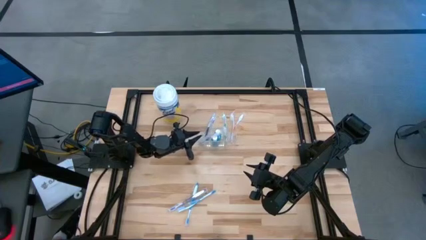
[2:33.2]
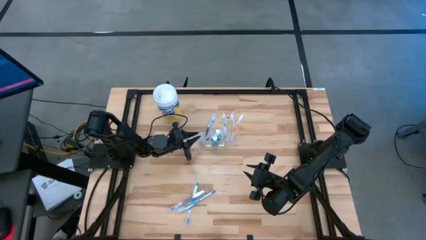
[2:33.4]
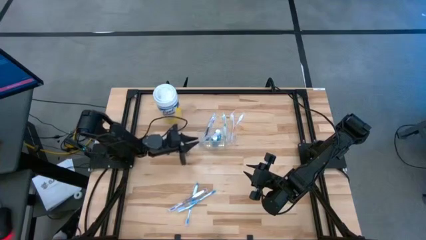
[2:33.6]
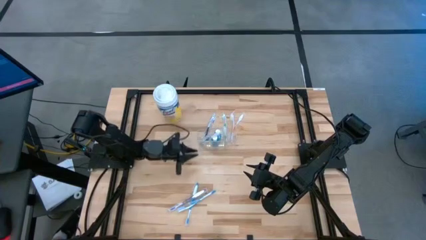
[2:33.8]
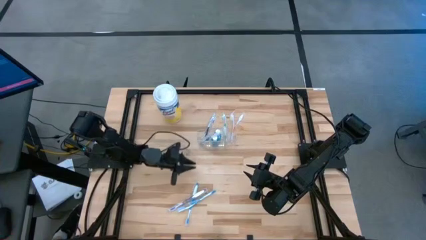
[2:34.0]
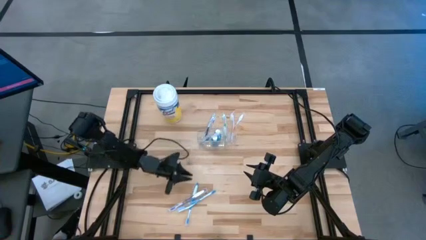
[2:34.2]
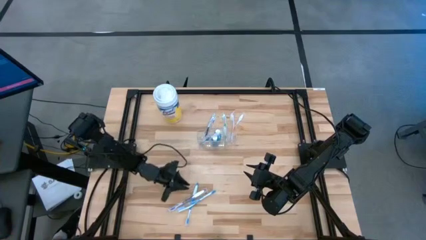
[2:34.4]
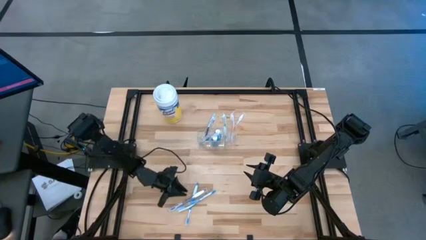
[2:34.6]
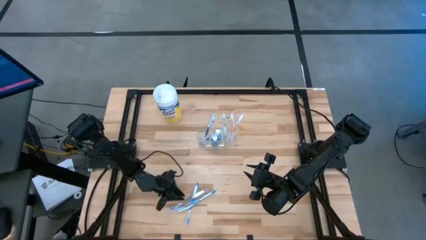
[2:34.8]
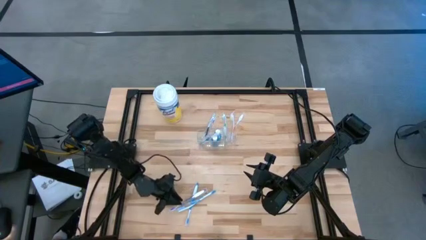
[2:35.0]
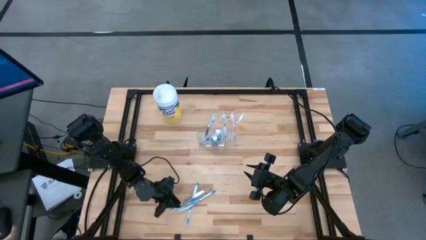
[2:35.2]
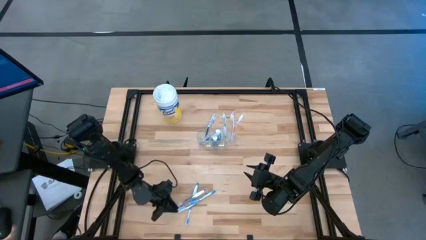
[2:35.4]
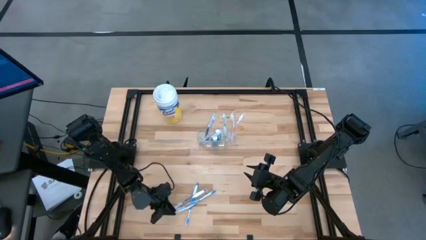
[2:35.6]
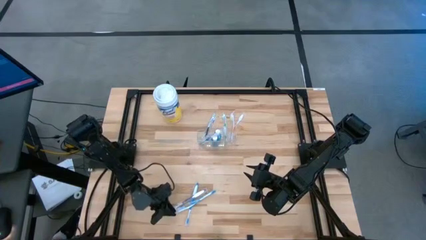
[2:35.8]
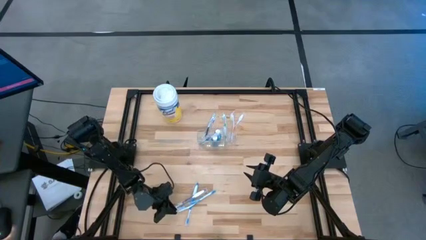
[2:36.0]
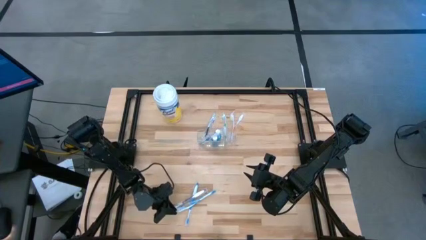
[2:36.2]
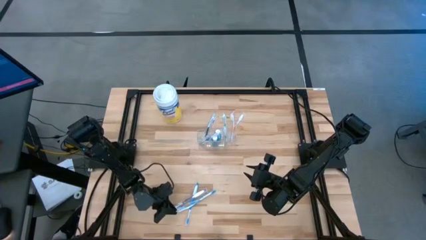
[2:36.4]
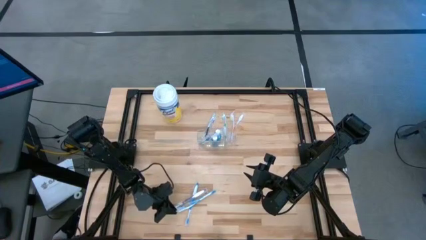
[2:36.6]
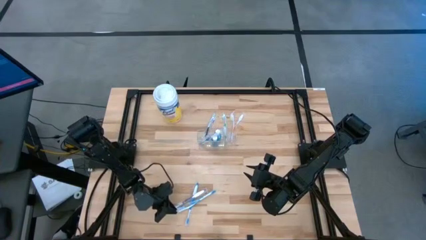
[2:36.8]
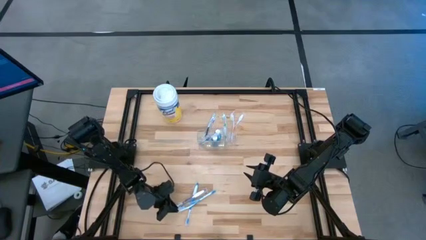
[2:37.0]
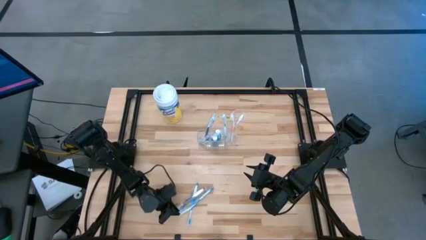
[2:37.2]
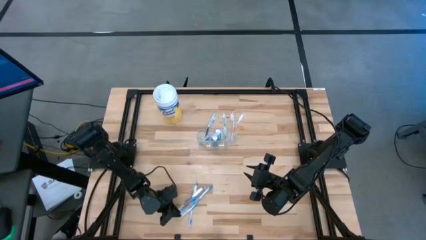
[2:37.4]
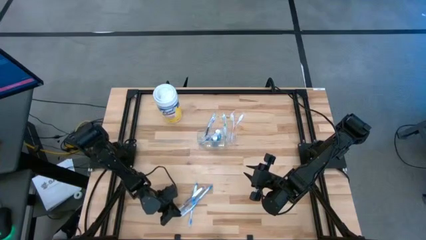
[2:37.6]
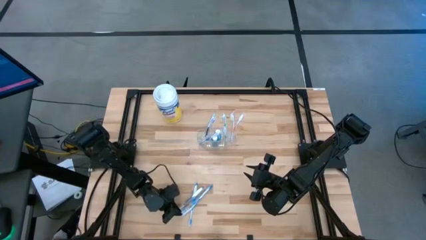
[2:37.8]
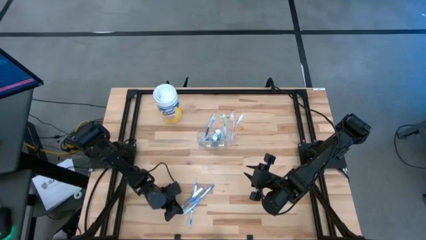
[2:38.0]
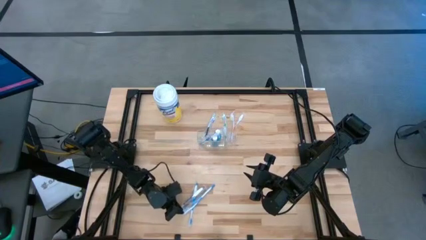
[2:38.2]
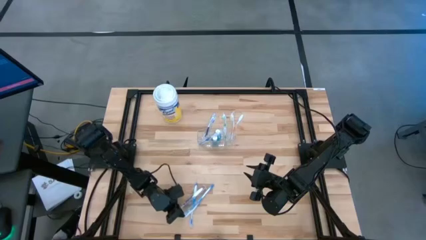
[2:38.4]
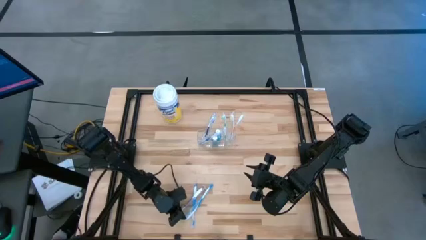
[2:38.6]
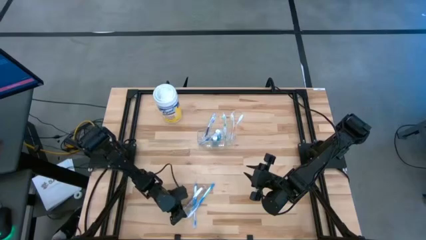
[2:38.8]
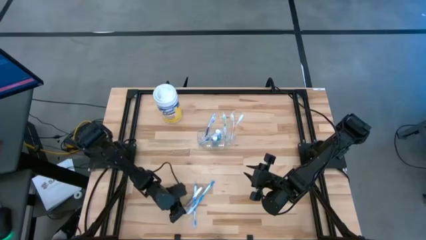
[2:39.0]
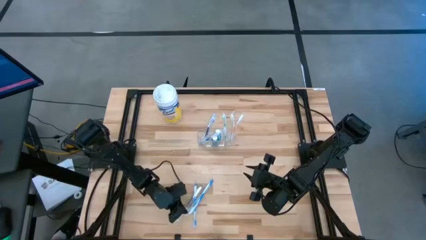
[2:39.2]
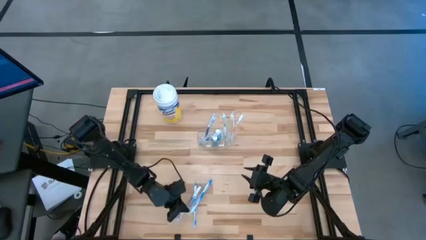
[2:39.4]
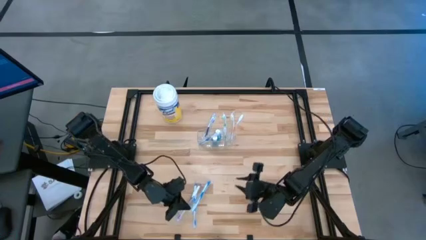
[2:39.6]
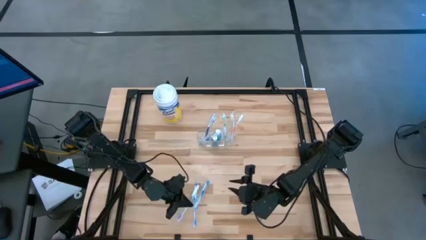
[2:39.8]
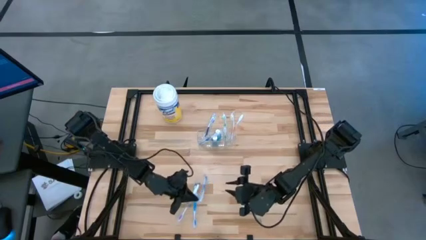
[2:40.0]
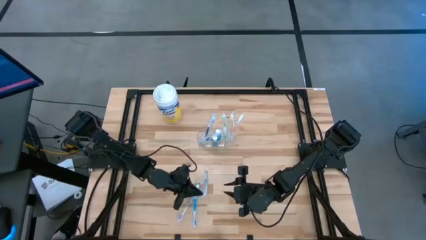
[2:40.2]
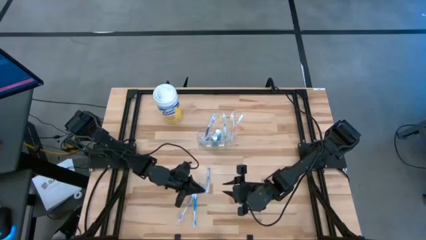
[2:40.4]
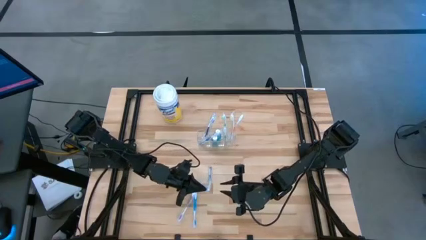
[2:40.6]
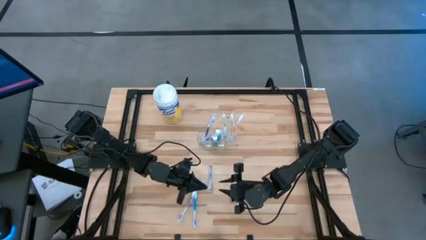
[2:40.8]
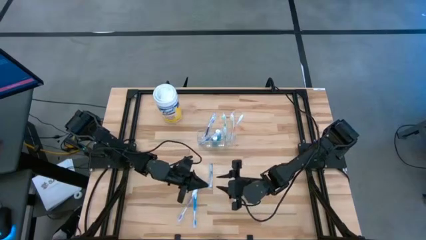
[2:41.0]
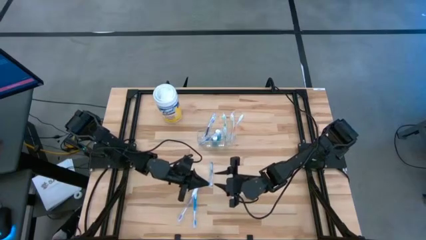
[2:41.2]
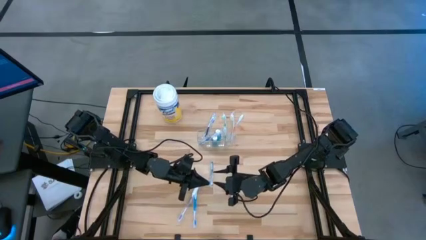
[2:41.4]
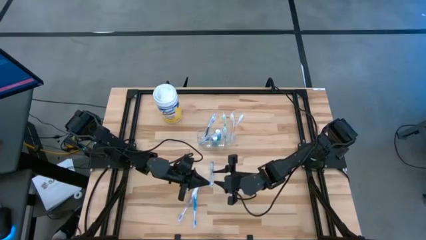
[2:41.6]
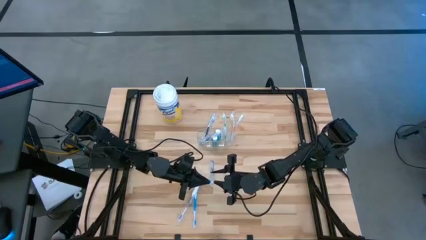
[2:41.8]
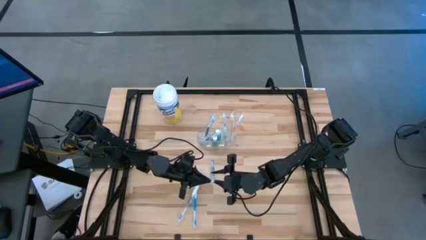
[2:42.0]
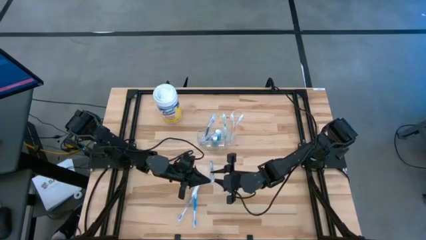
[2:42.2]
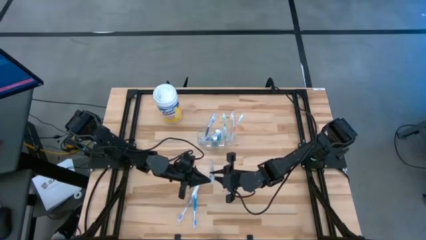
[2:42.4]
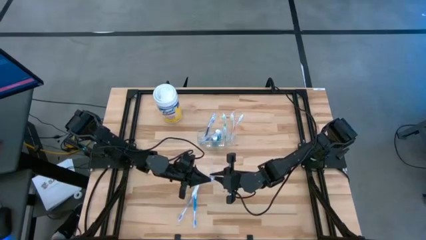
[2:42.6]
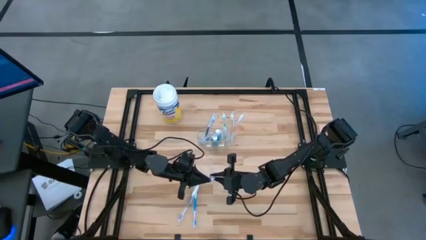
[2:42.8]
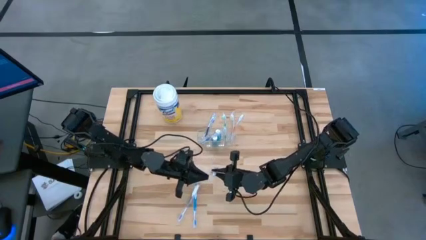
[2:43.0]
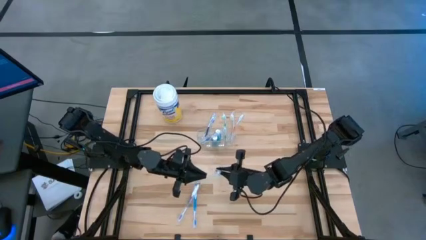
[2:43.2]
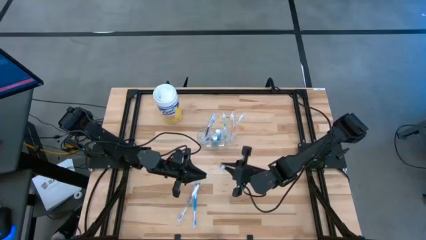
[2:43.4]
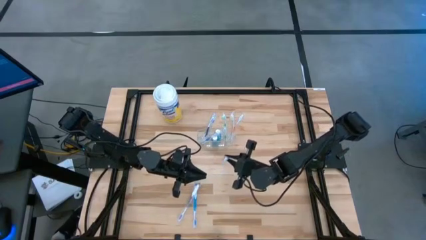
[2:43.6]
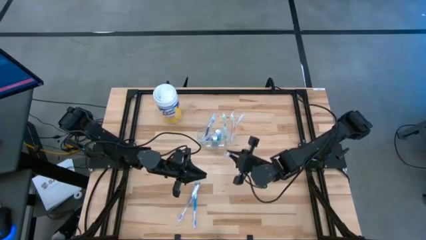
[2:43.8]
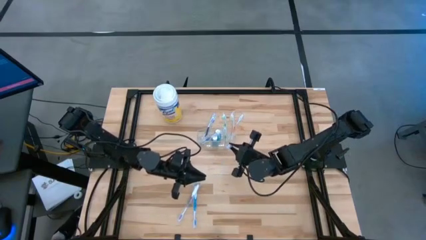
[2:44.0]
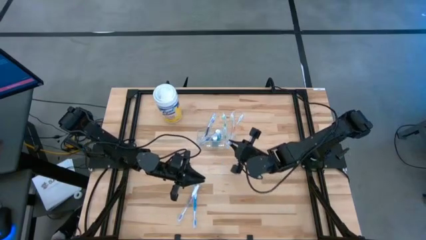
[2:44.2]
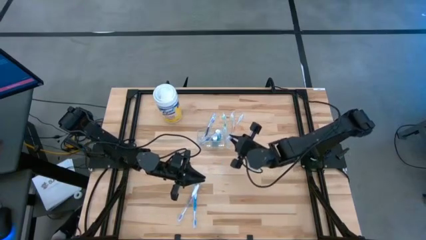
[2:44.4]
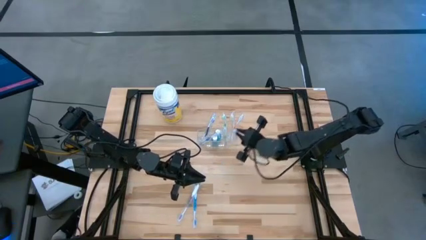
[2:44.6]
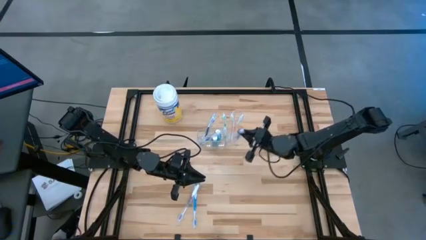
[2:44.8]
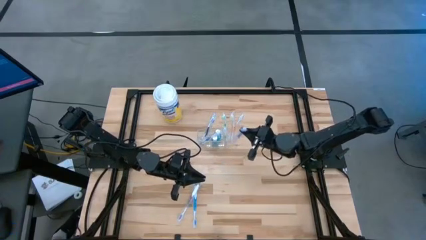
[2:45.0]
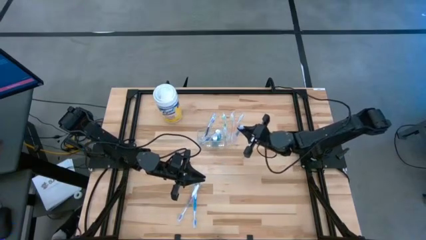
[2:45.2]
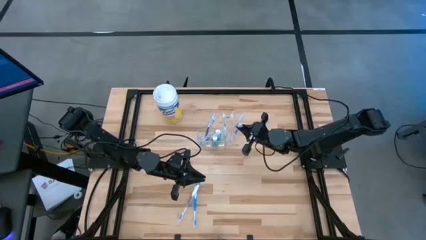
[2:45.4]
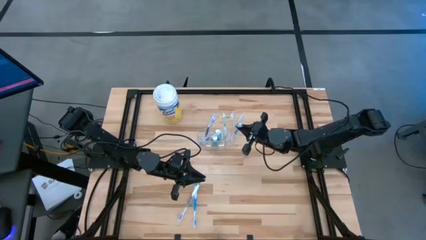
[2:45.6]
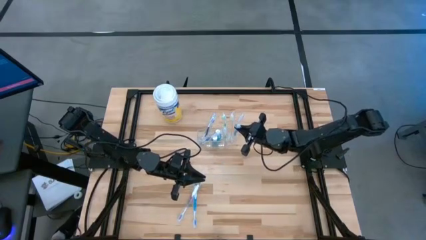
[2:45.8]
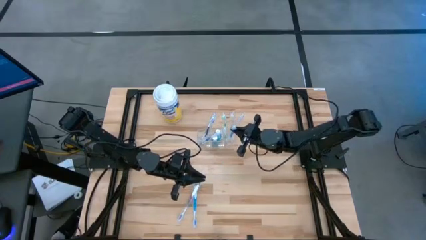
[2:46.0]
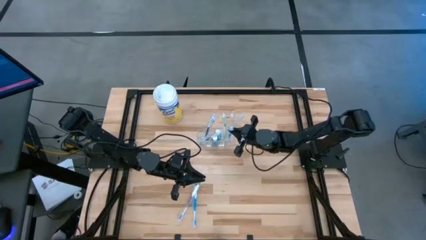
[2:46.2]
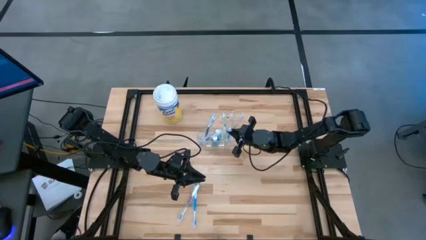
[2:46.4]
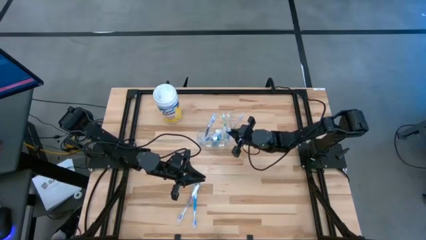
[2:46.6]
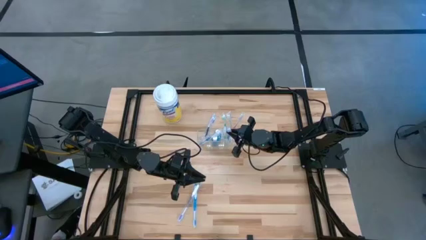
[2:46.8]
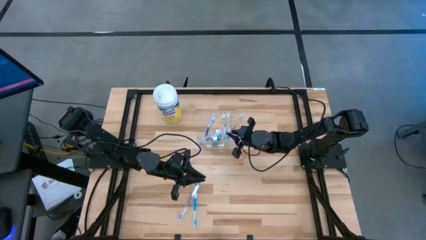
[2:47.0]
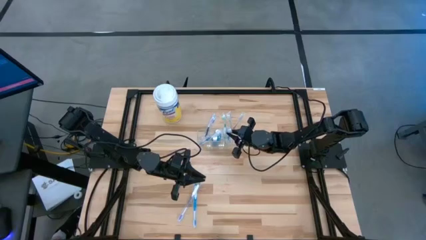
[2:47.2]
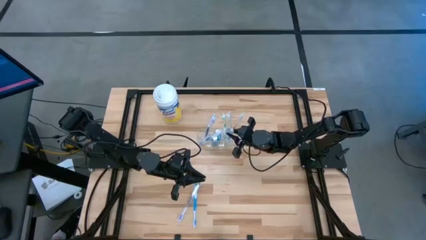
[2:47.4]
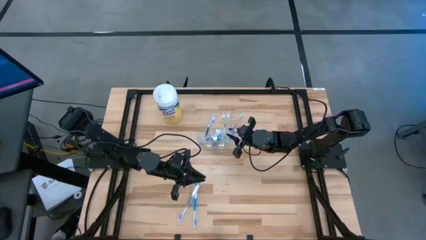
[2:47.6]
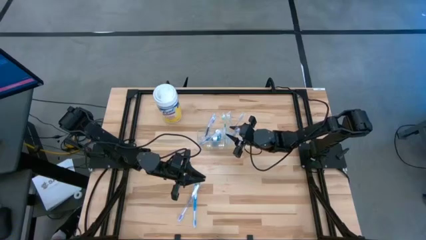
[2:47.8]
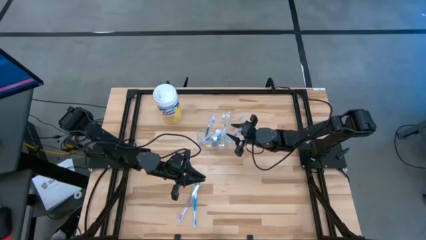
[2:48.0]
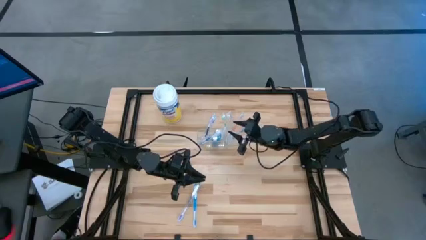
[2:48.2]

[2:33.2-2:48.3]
Task: Pick & Place toothbrushing station
Put the left blue toothbrush into the transparent organizer
